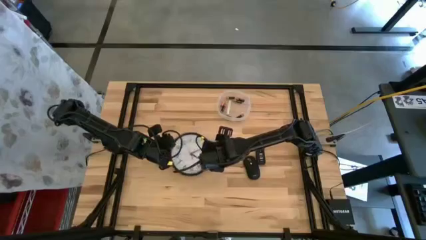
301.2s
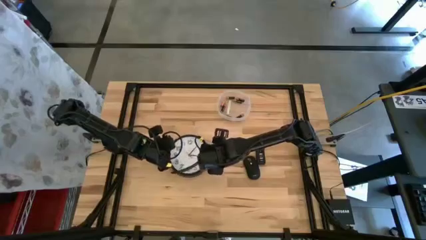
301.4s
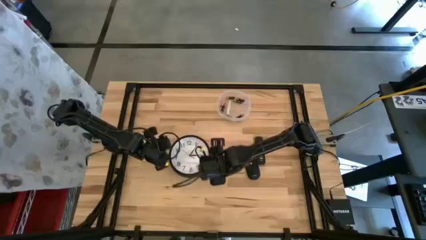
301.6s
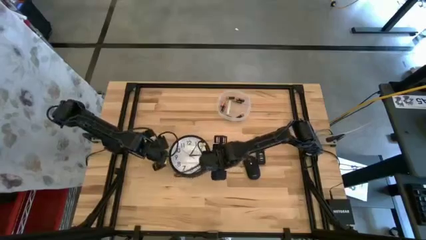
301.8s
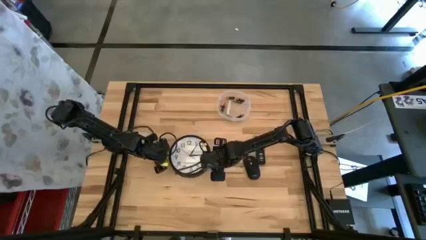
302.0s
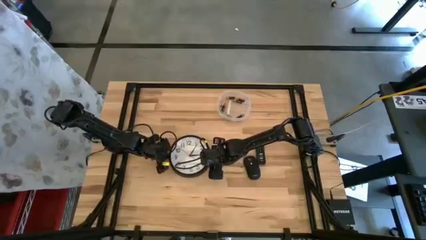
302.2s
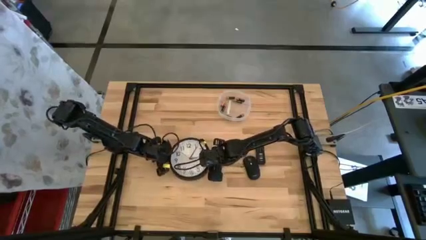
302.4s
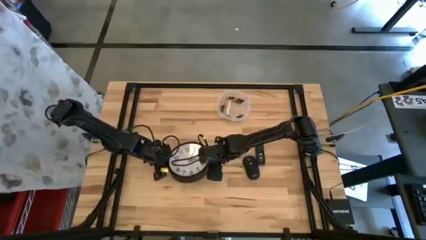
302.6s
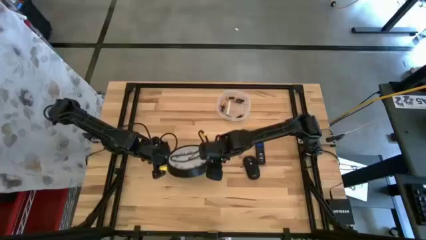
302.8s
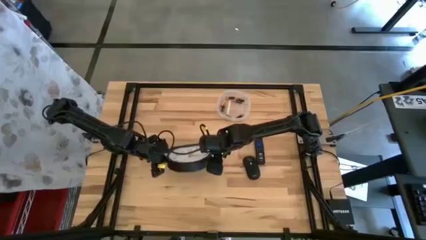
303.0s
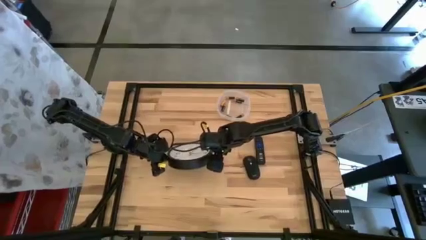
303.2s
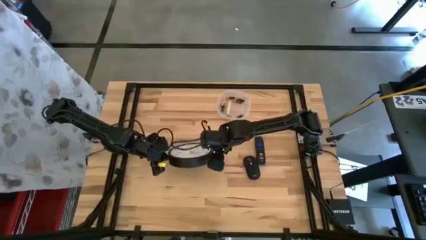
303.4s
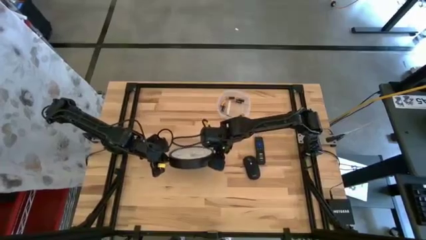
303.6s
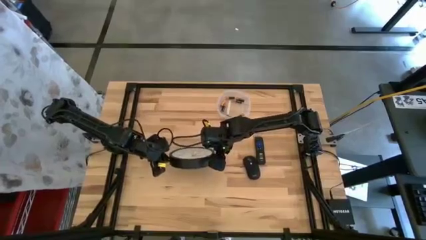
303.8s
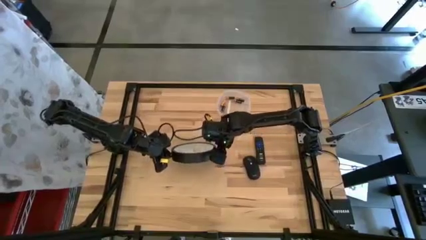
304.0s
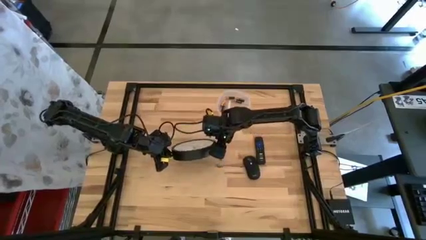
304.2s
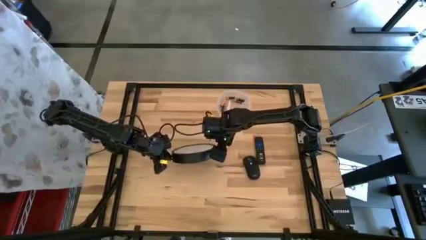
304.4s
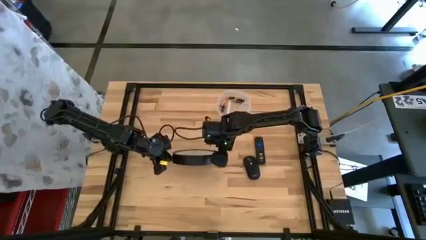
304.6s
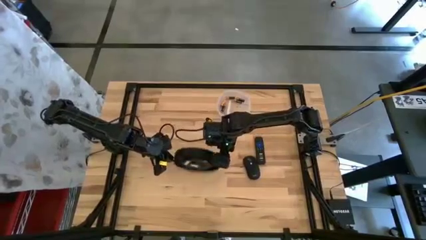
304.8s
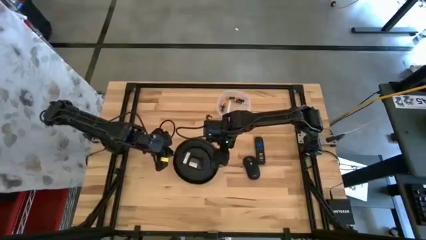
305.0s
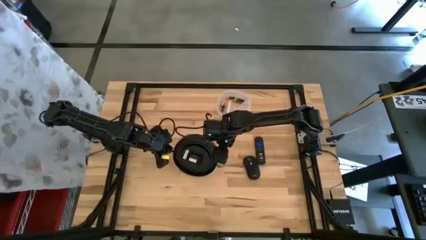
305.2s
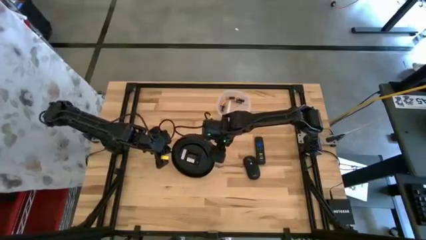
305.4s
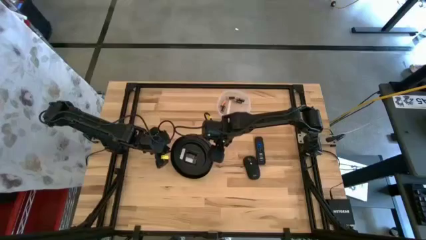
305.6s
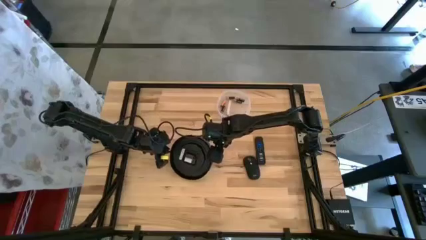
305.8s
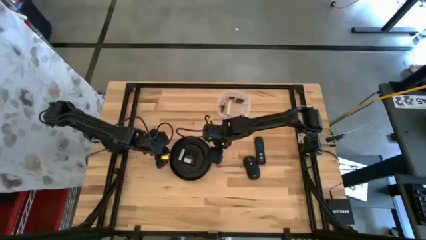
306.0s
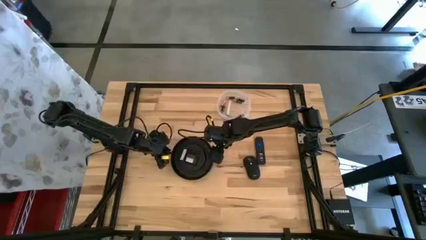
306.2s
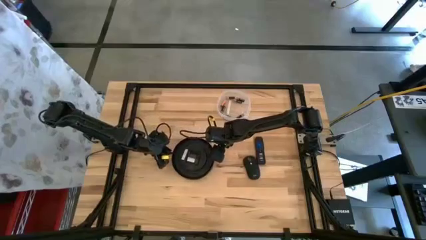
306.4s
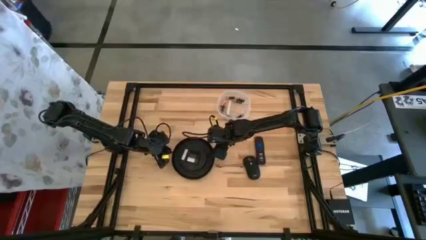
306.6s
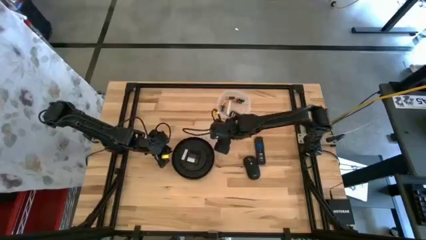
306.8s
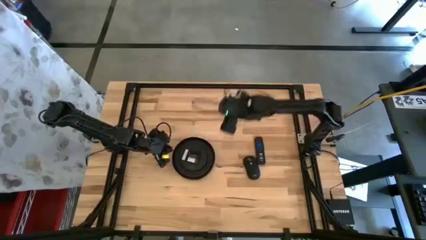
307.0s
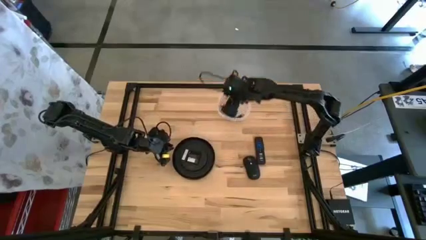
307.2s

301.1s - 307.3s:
Task: Insert battery
Prepare the wall clock

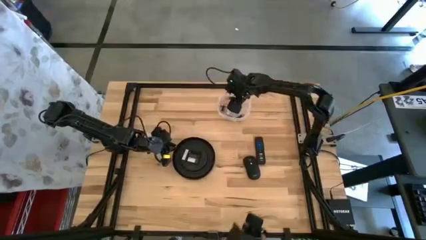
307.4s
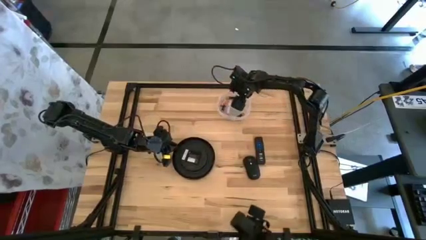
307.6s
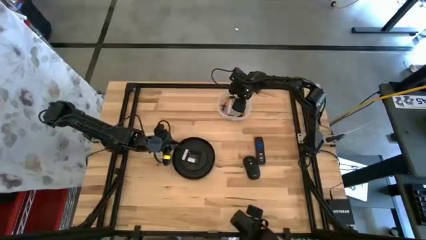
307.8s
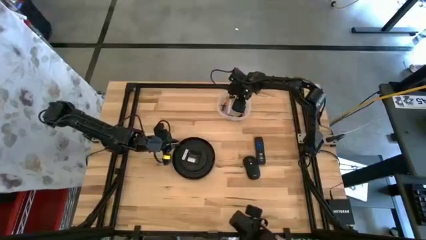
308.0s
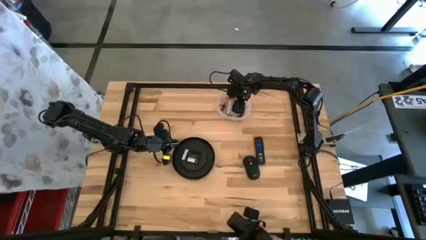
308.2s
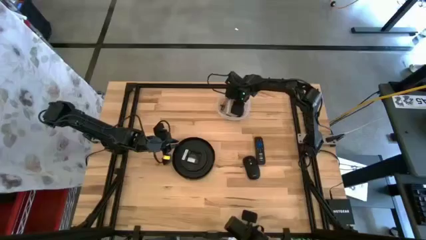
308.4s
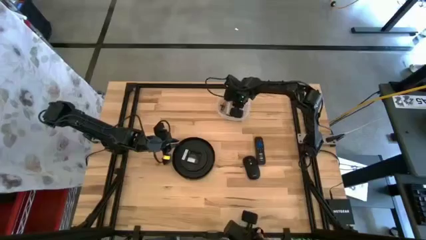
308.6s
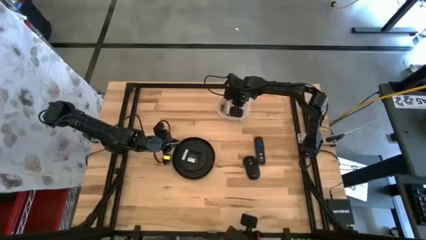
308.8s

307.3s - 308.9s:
Insert the black battery into the wall clock

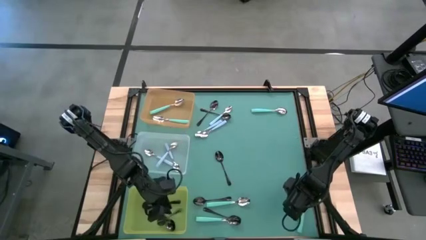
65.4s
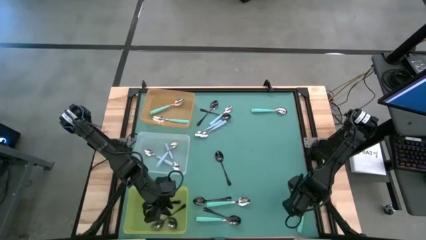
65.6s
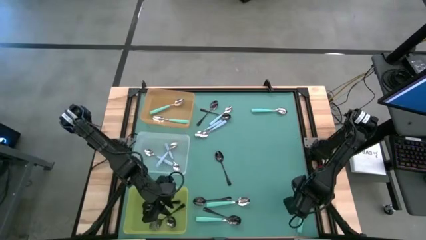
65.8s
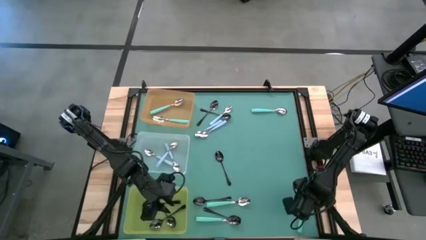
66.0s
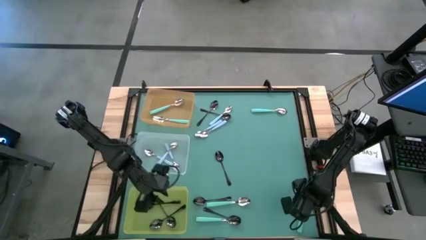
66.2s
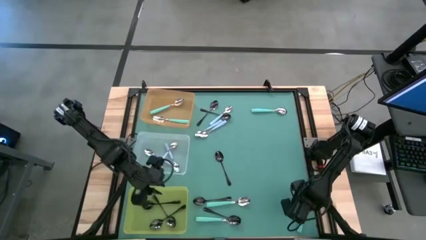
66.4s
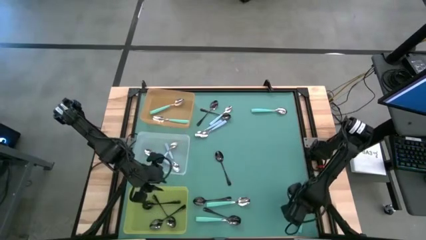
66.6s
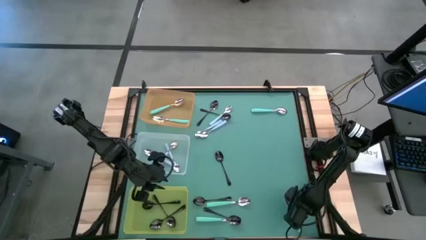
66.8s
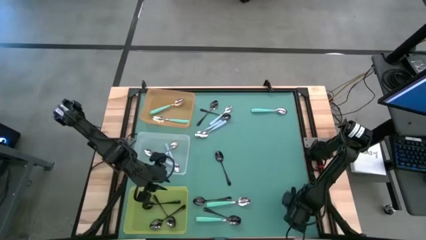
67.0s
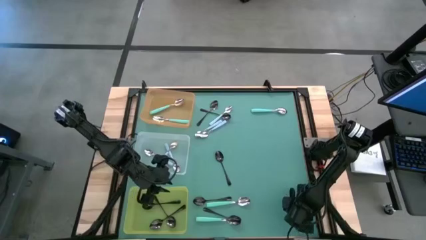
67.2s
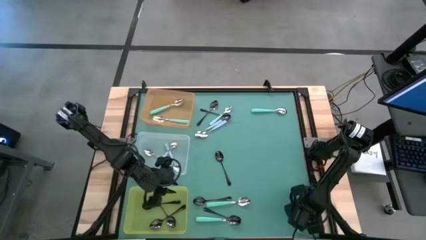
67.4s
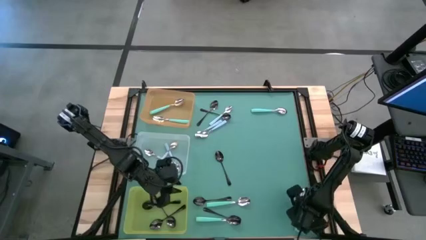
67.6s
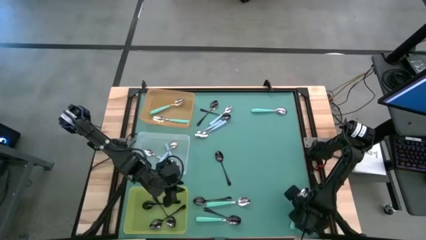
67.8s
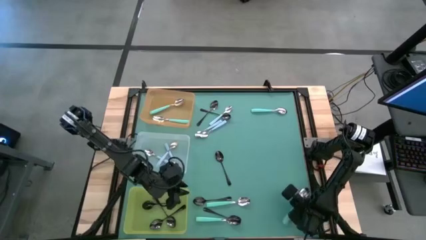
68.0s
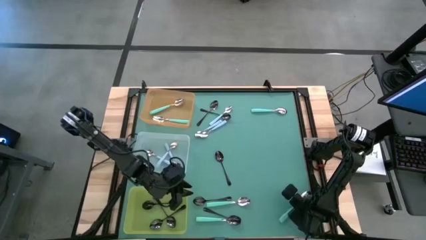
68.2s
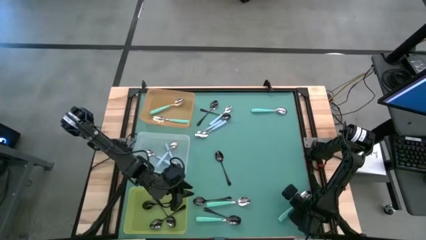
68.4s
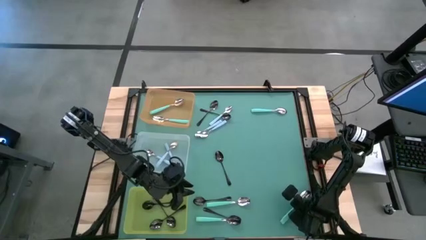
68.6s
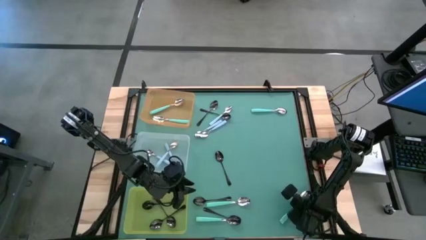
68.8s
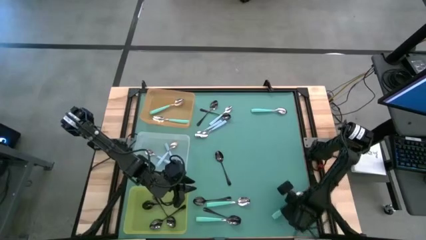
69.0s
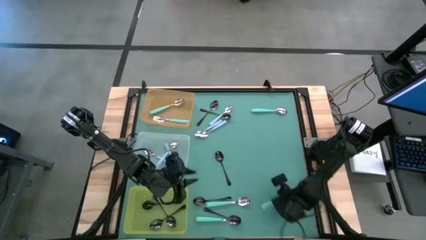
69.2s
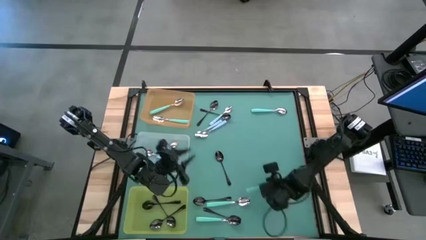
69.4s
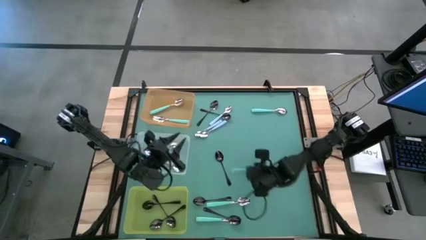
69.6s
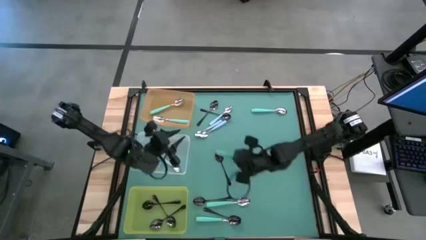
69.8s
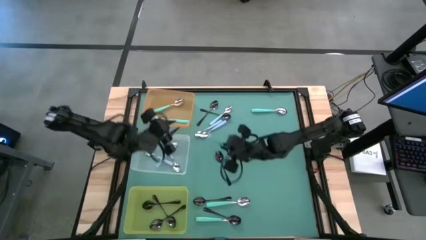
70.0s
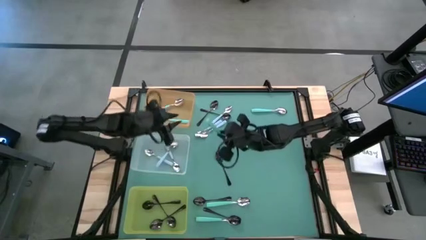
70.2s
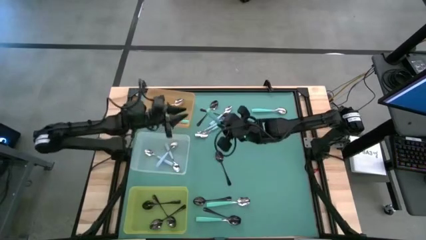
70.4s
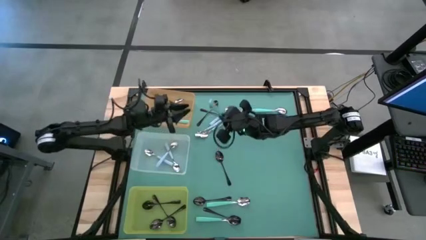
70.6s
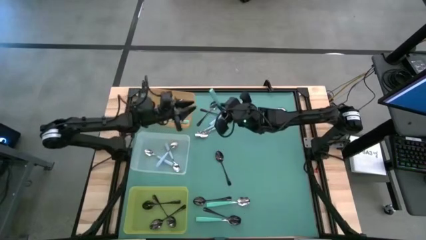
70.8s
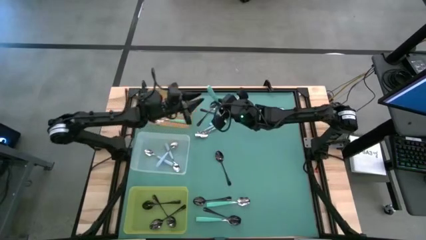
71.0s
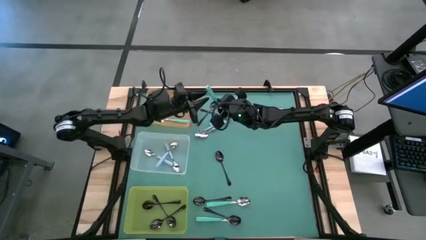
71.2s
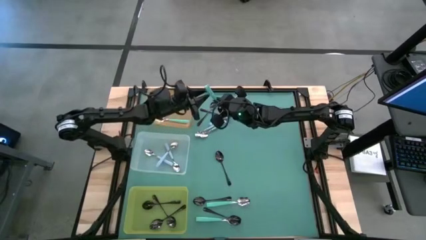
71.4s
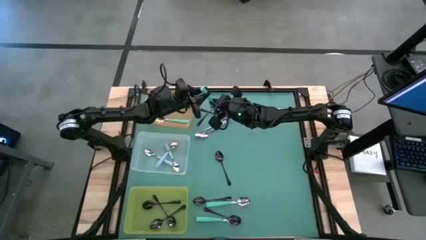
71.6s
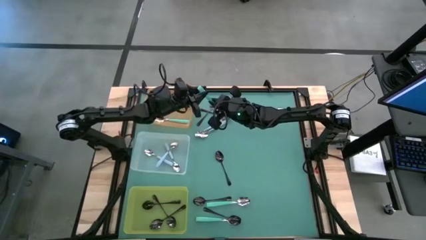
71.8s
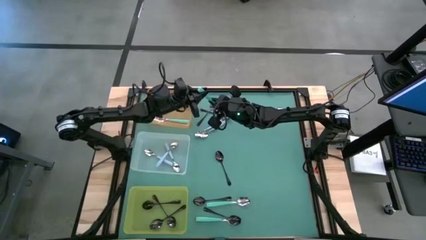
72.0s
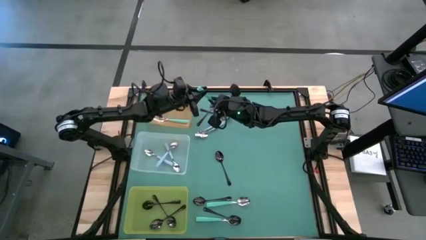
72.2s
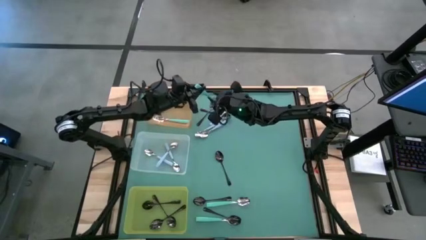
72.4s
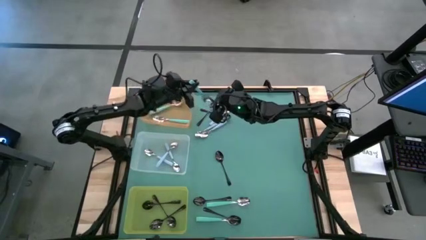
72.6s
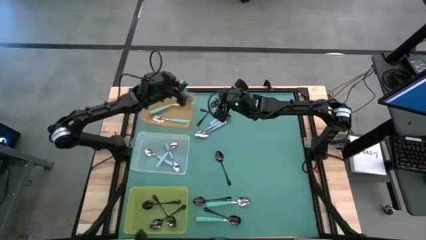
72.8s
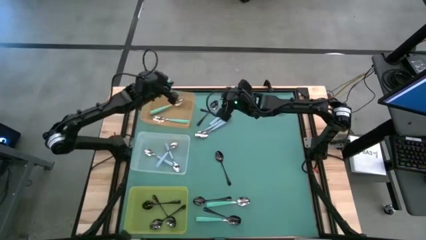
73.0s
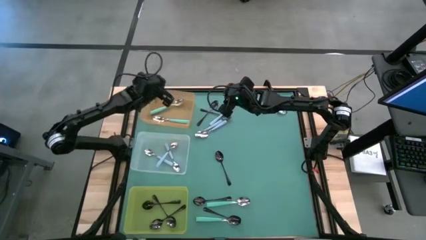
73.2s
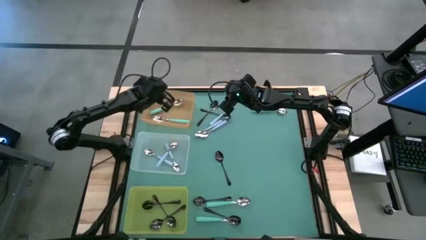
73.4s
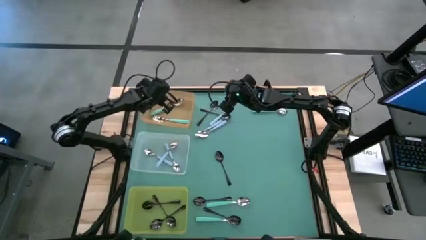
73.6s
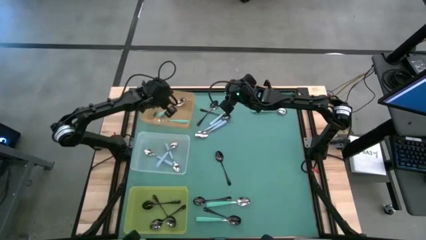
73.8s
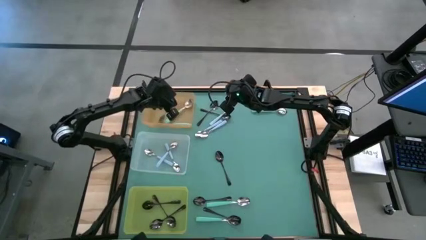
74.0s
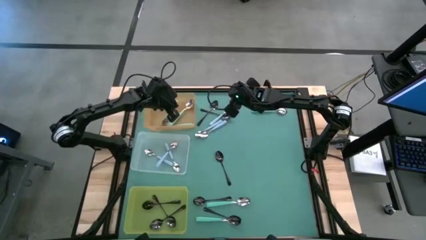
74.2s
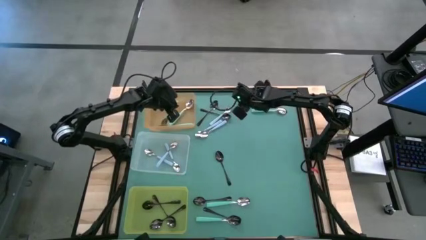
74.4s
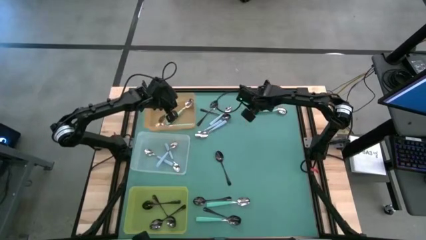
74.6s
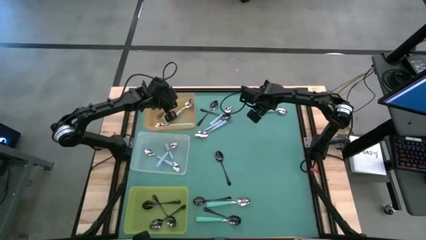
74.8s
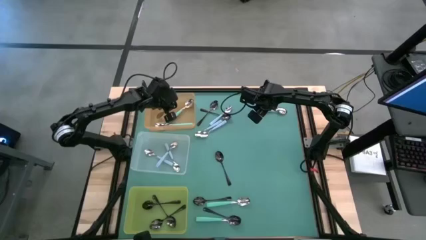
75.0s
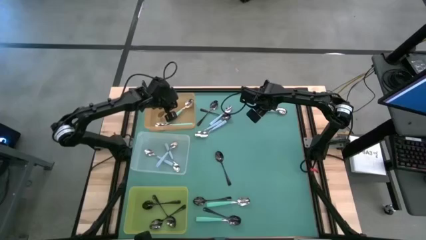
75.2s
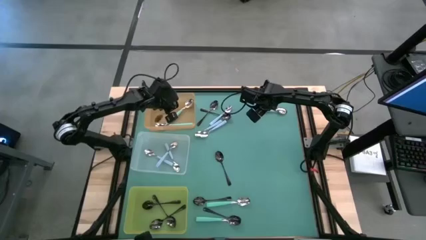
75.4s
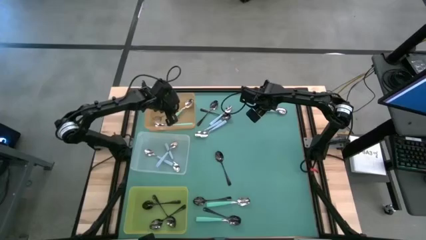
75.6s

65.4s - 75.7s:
Task: Sort silverware by color (type)
Put the green spoon into the orange bin
